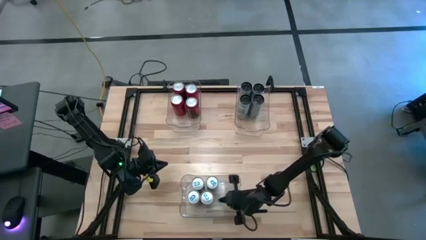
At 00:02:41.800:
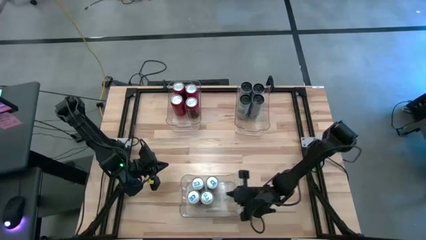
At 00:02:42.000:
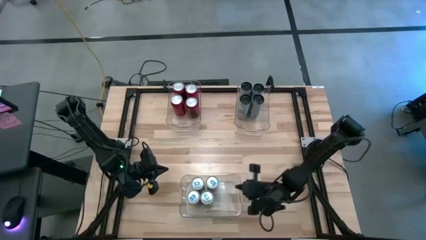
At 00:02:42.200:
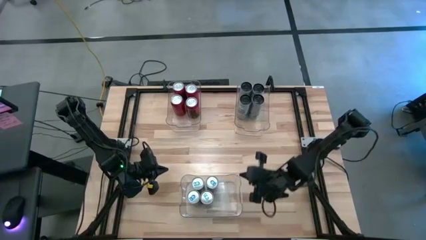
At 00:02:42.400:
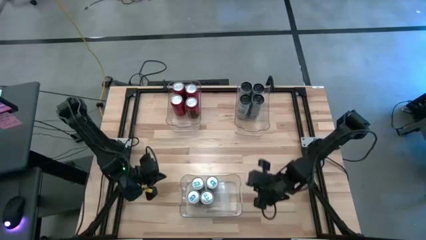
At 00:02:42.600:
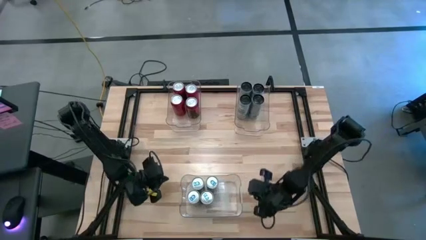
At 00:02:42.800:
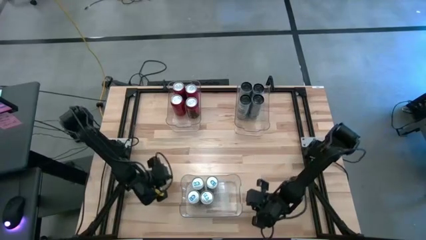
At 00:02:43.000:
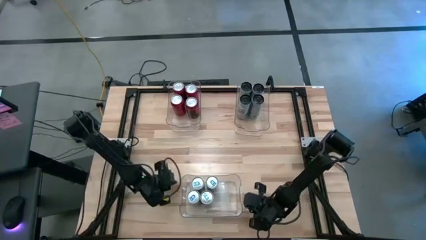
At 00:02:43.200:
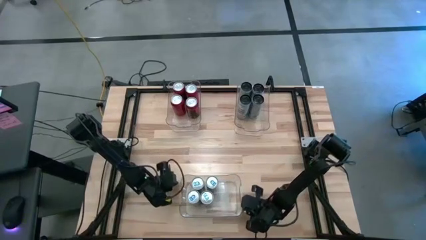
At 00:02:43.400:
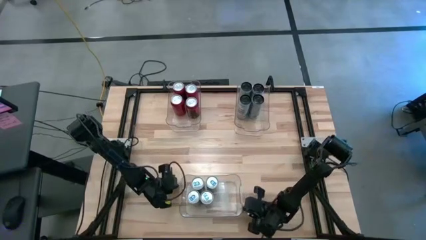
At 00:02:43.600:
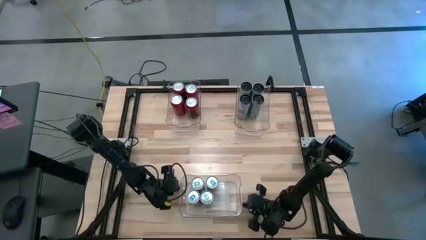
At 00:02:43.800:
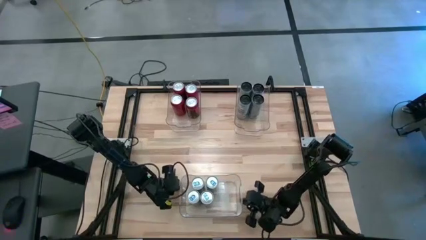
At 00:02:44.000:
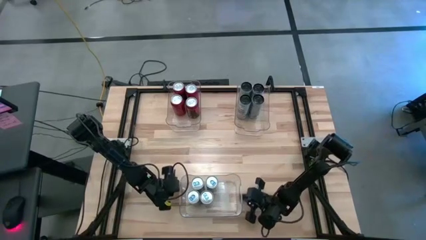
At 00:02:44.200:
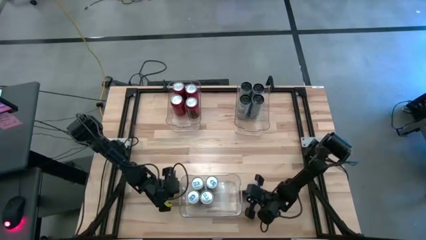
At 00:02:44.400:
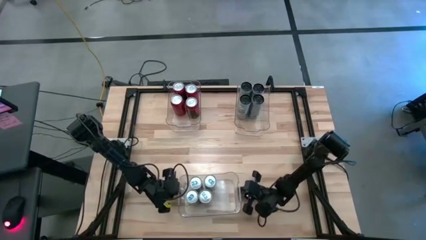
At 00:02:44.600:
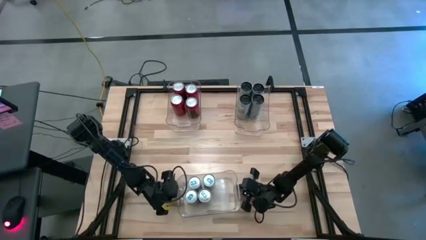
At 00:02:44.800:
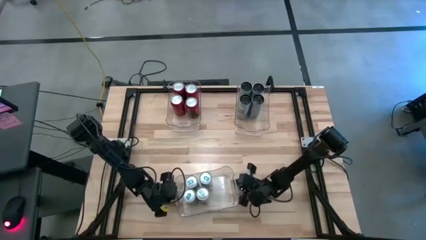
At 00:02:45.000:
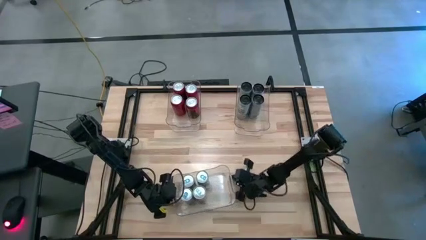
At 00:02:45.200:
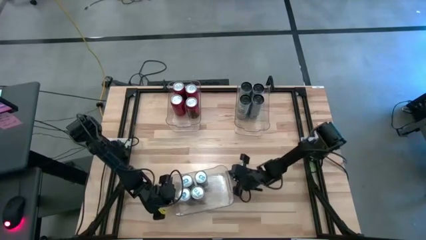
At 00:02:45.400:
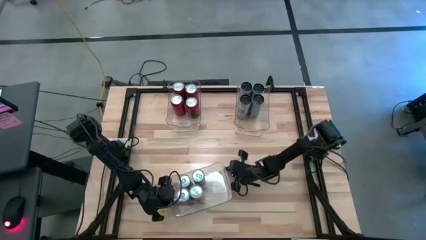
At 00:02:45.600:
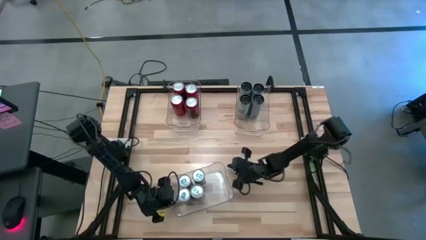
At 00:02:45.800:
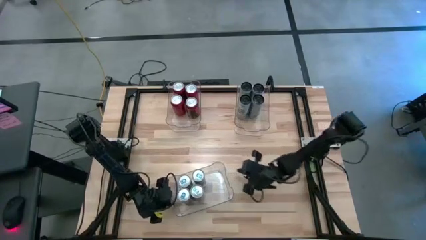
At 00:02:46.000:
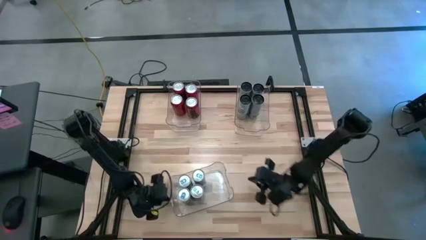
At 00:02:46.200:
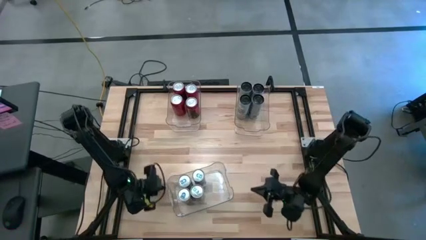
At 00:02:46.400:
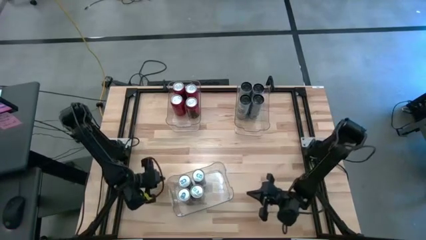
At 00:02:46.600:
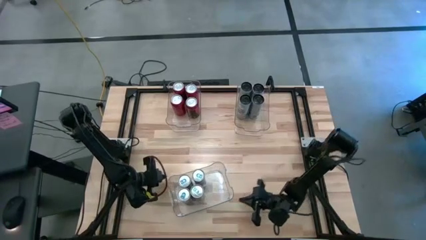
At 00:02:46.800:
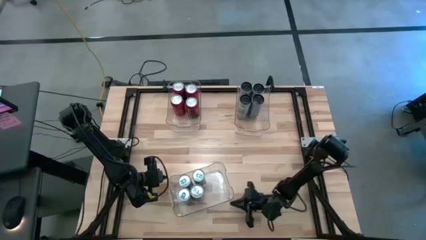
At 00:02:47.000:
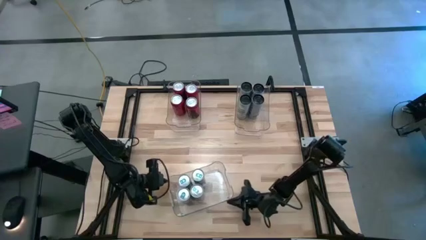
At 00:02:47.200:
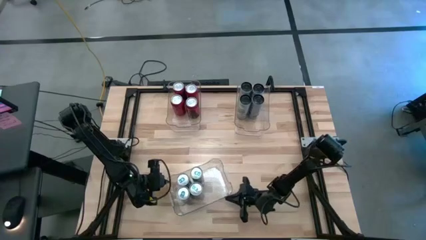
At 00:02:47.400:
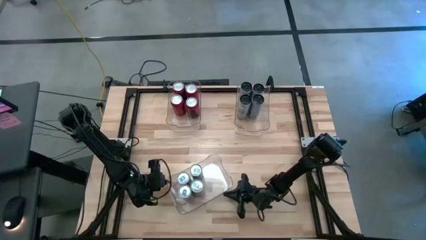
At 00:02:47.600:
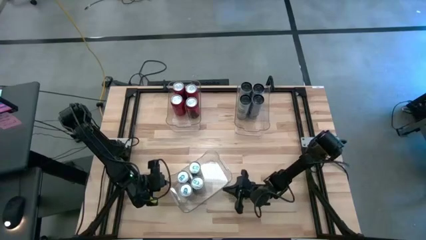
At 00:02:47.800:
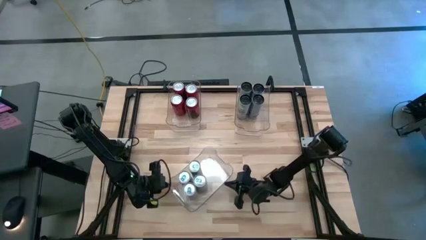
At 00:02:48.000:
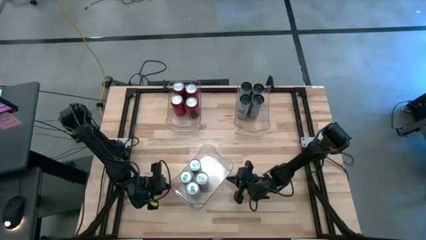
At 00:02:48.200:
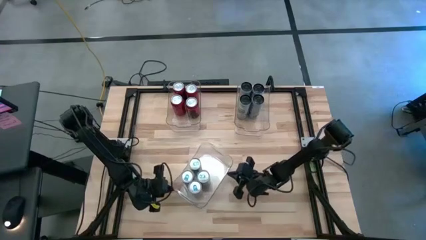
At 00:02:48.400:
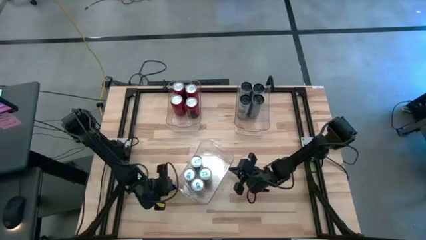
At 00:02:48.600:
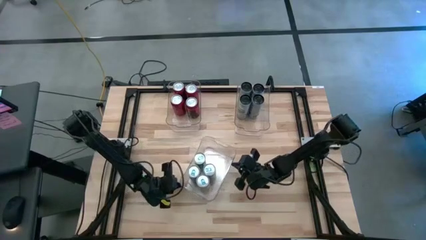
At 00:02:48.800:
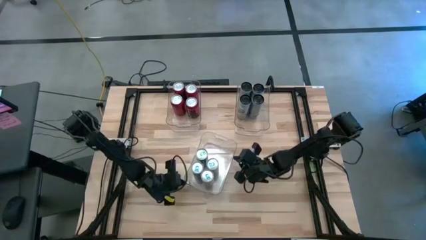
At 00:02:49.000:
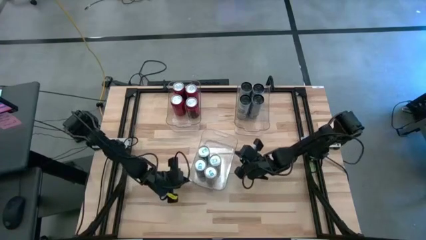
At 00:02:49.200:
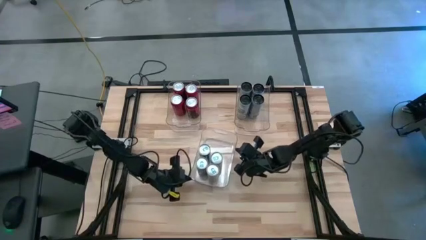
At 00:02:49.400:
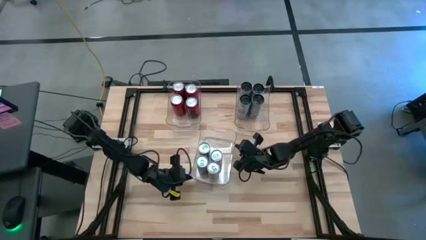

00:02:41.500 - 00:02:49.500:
Task: Sort soda cans
Move the bottom center transparent bin to the center of the table

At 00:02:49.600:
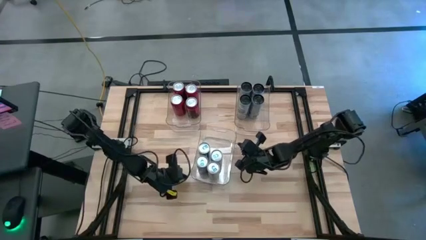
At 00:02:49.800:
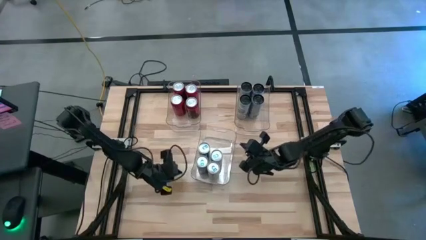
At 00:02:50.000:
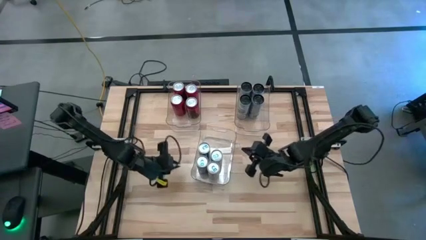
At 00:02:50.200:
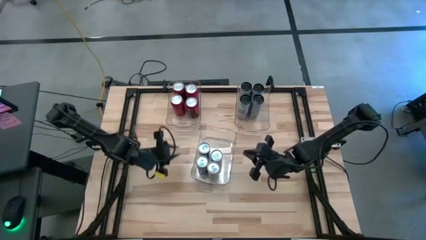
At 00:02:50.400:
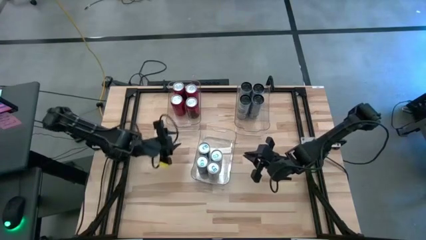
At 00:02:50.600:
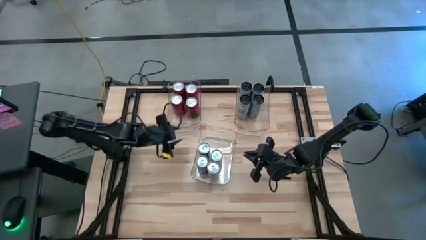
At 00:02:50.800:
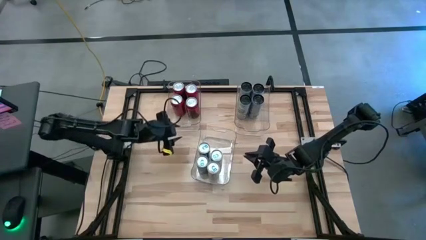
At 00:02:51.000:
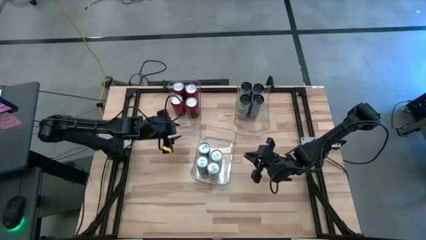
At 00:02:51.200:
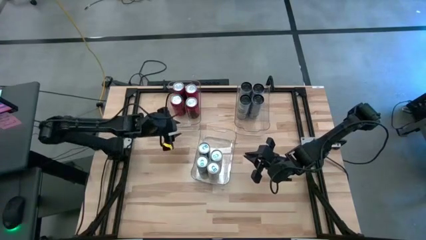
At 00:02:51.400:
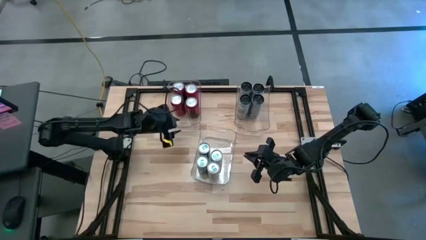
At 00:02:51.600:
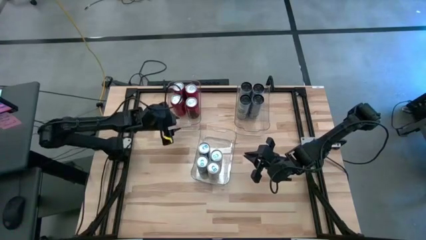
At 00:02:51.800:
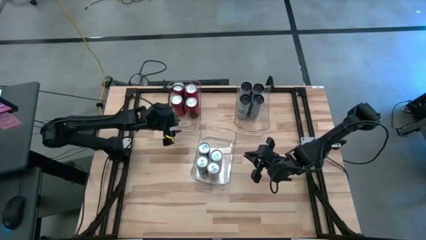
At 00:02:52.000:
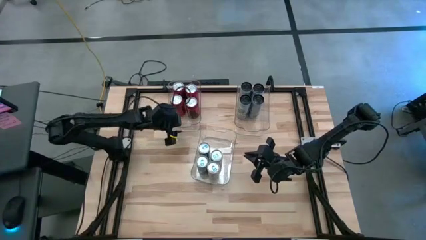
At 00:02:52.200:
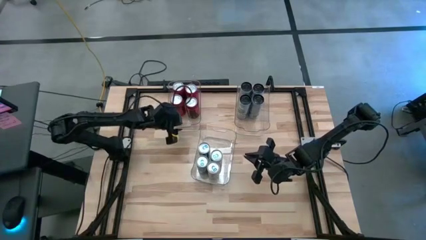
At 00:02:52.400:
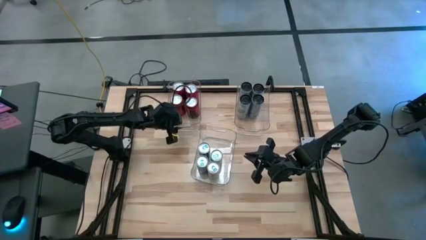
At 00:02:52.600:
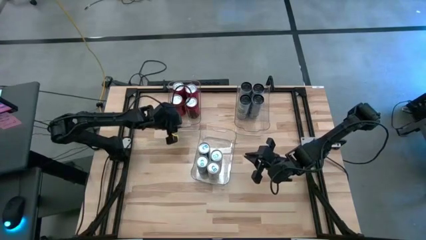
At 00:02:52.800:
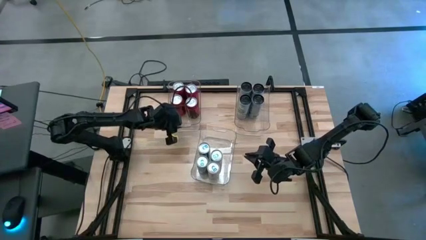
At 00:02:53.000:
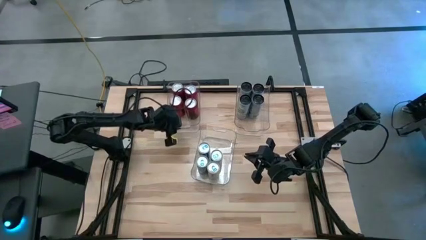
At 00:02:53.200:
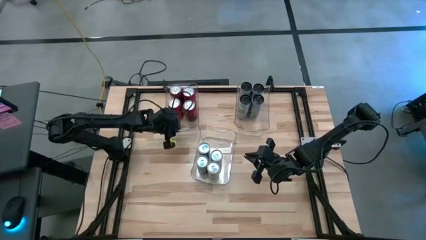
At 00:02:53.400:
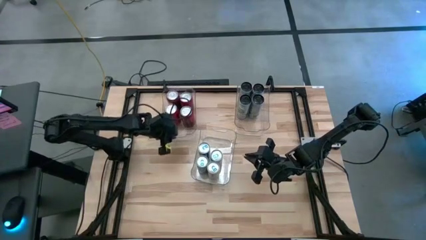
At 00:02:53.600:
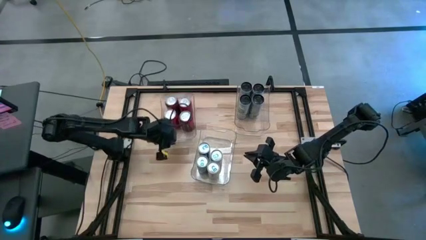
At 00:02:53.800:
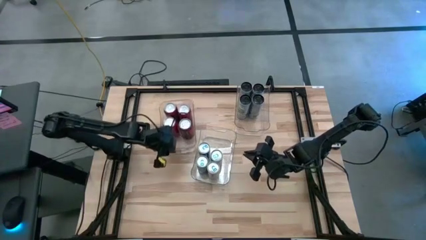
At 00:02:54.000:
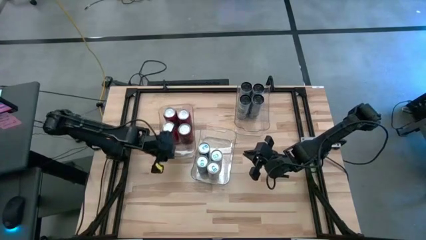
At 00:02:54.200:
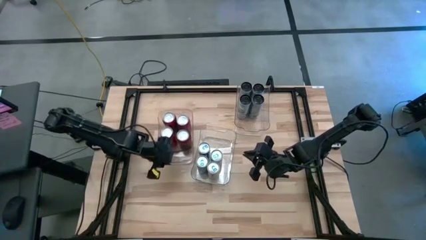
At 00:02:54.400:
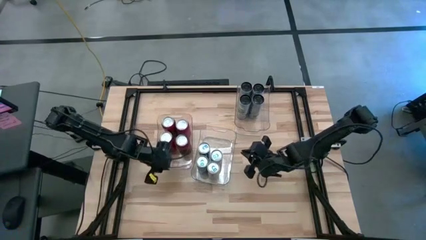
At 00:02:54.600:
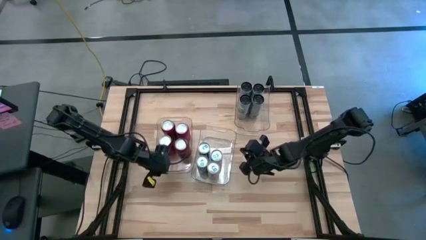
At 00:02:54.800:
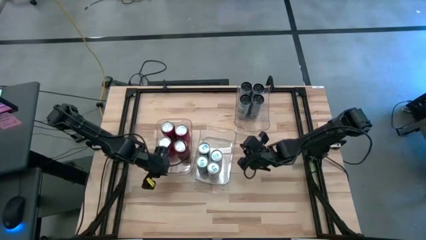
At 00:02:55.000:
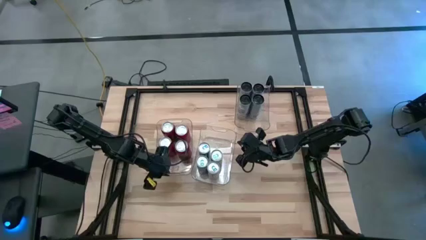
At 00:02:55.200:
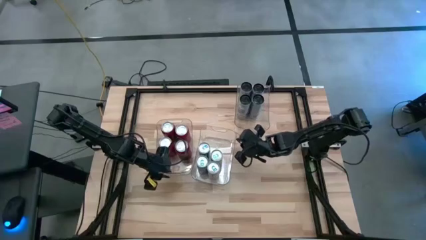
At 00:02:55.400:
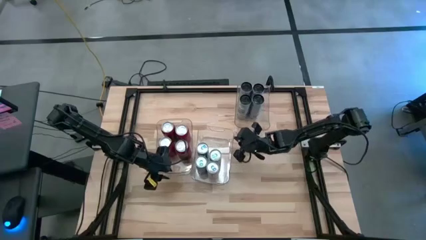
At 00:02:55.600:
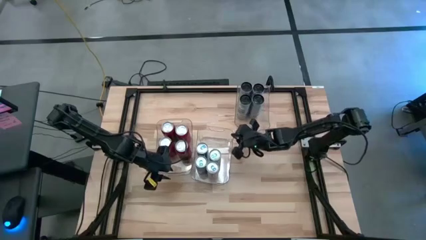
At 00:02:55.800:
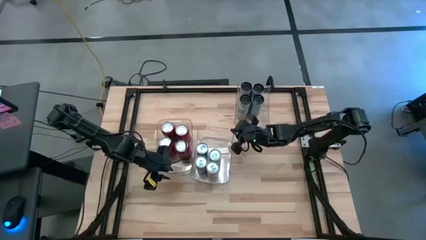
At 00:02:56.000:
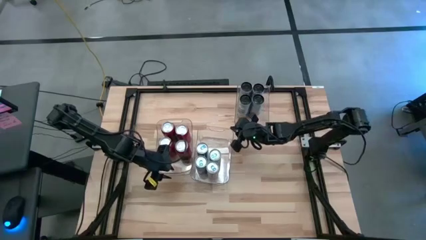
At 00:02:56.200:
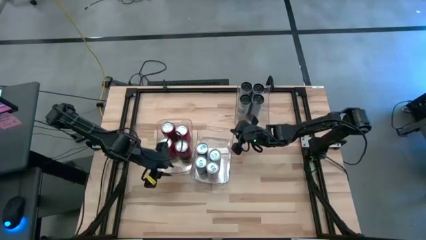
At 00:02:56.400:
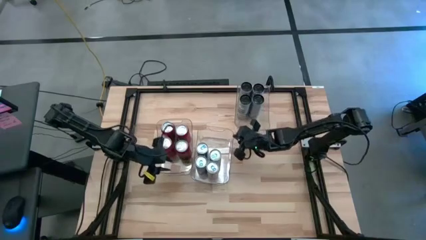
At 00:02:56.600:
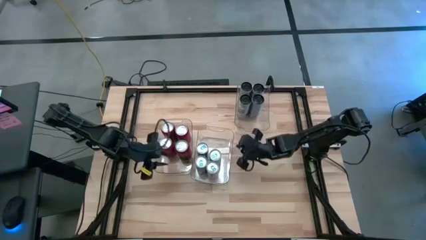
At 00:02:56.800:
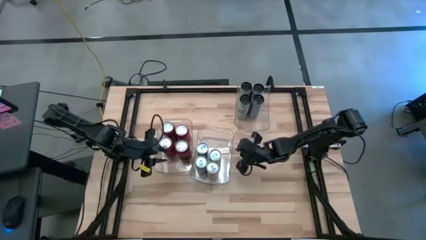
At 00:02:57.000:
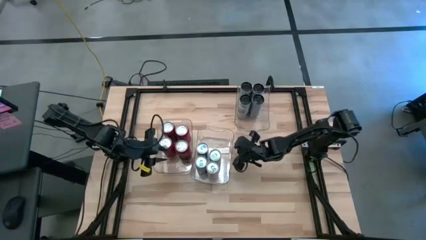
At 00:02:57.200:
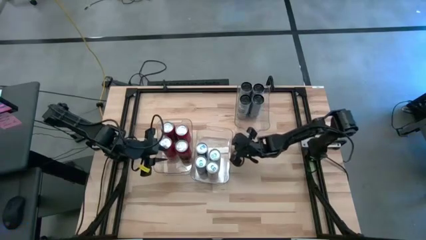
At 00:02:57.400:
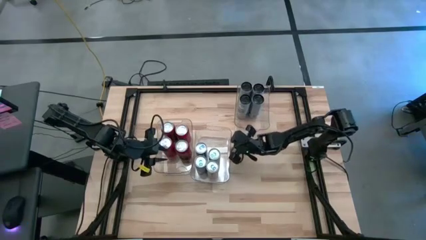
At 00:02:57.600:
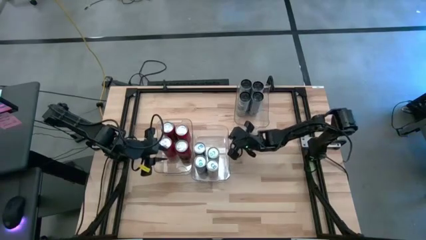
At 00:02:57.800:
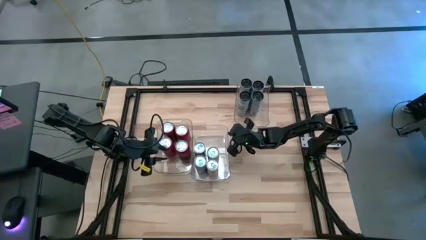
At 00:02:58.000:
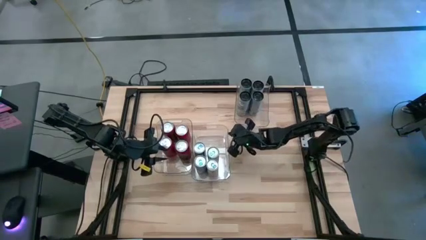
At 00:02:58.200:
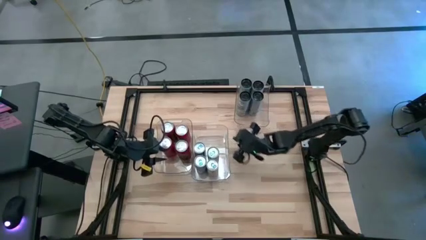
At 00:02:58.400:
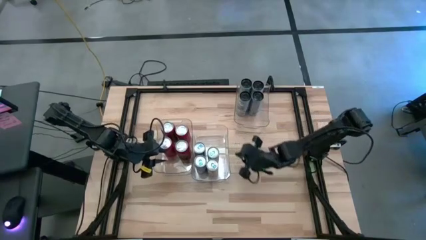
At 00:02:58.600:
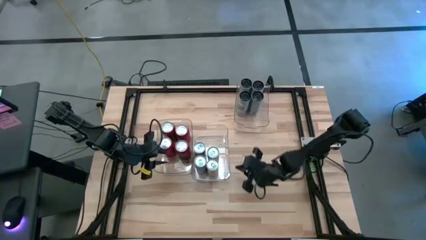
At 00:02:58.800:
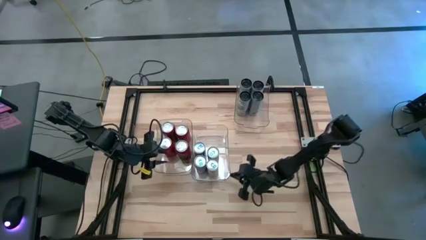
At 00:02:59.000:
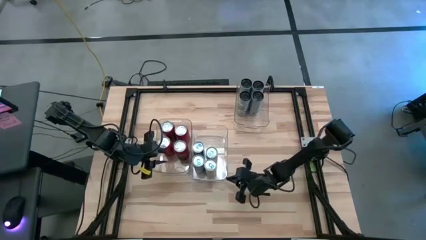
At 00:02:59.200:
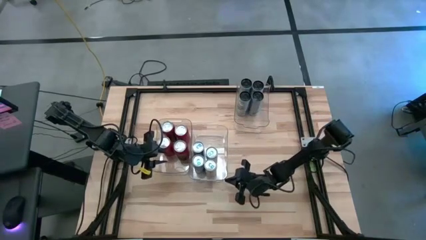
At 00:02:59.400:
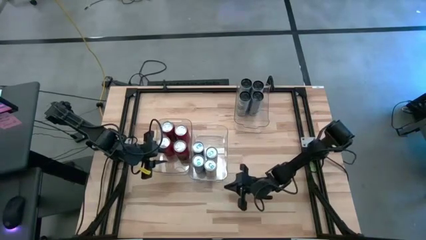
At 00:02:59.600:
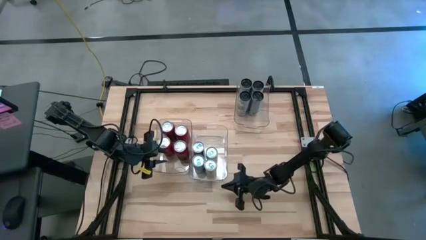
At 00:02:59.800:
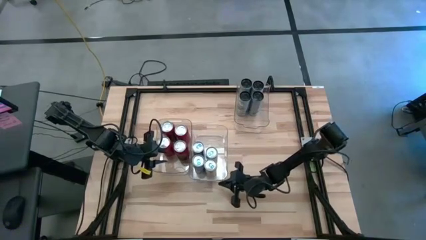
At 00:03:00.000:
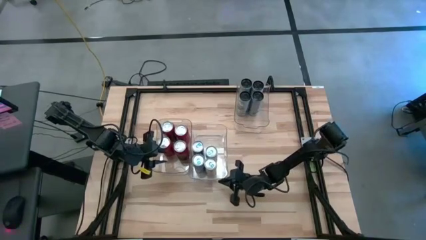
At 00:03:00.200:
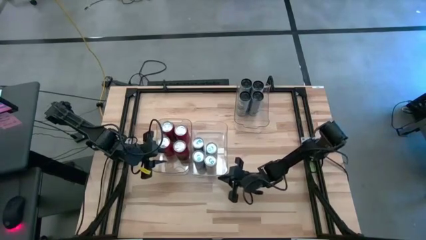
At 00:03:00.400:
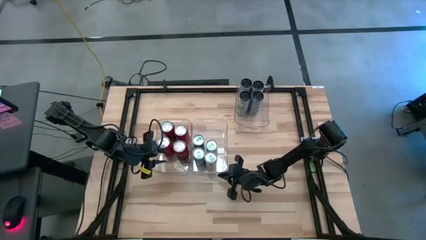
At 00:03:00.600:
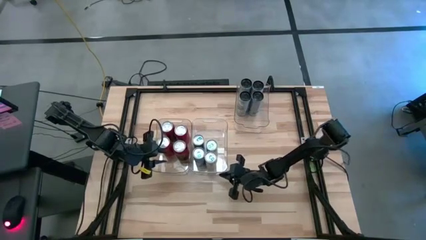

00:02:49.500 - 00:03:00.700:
Move the top left transparent bin to the middle left of the table
